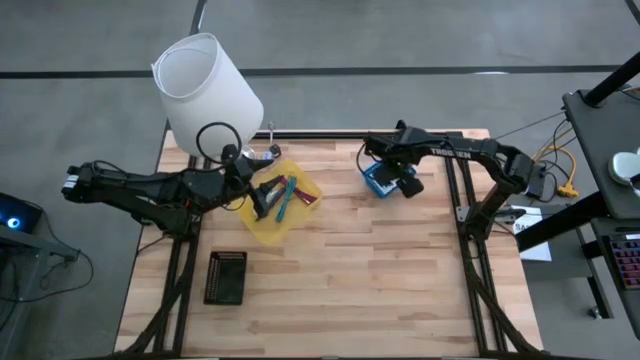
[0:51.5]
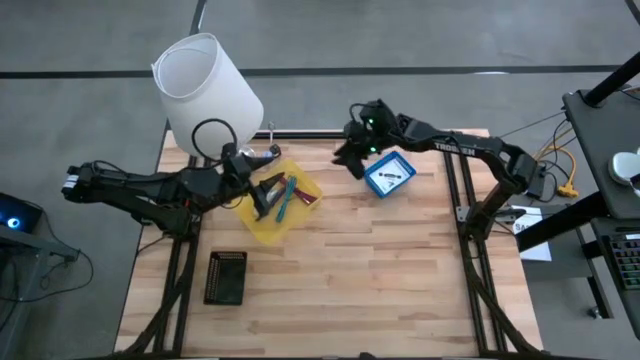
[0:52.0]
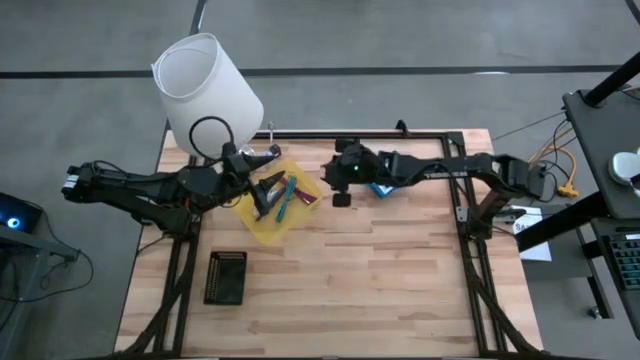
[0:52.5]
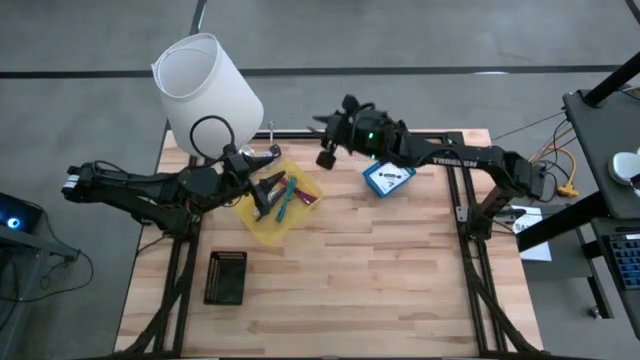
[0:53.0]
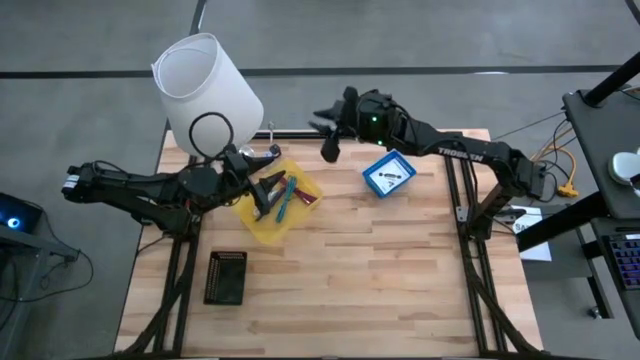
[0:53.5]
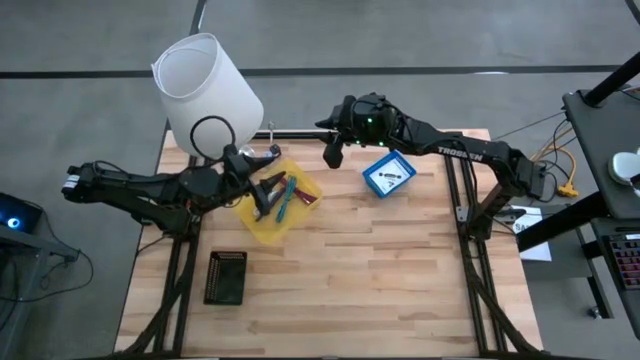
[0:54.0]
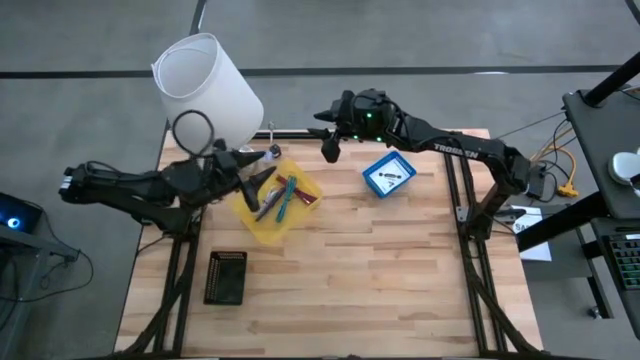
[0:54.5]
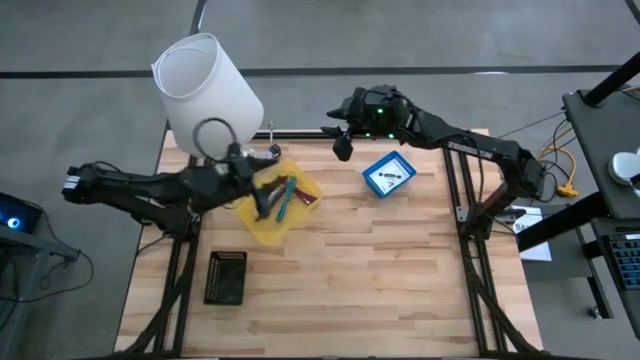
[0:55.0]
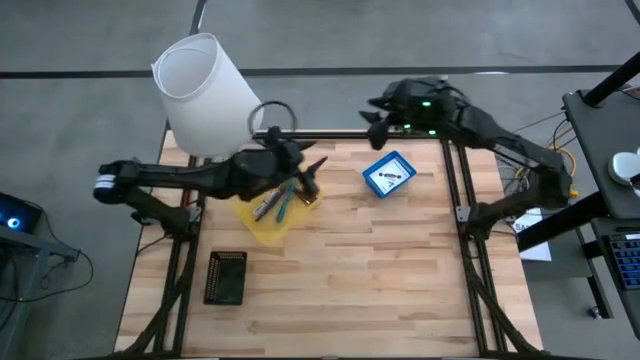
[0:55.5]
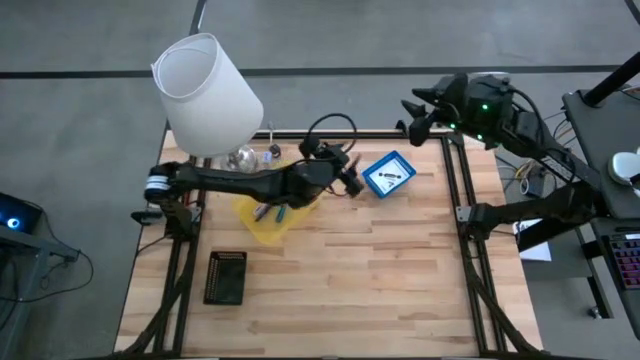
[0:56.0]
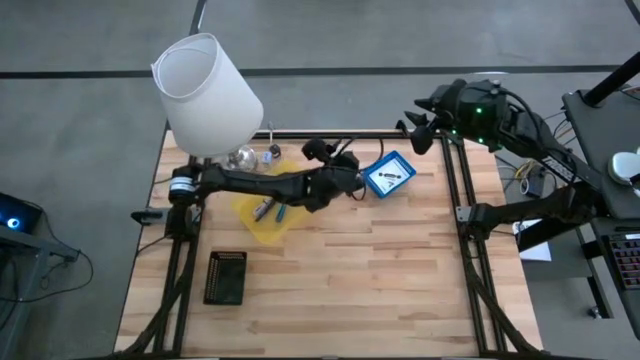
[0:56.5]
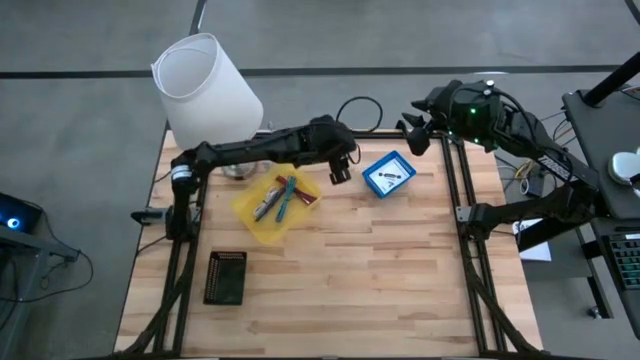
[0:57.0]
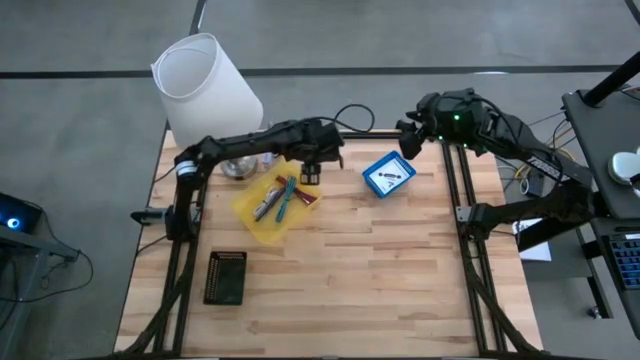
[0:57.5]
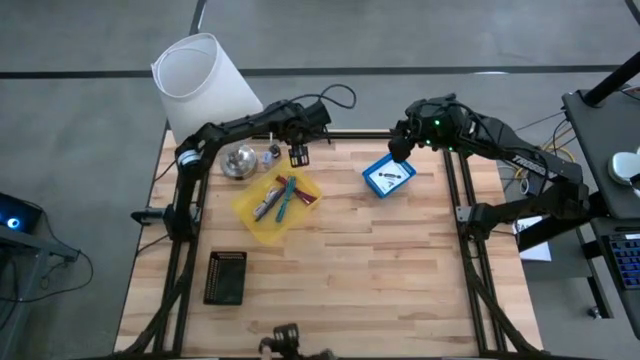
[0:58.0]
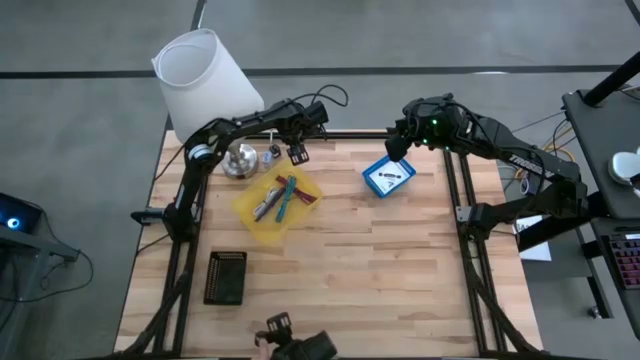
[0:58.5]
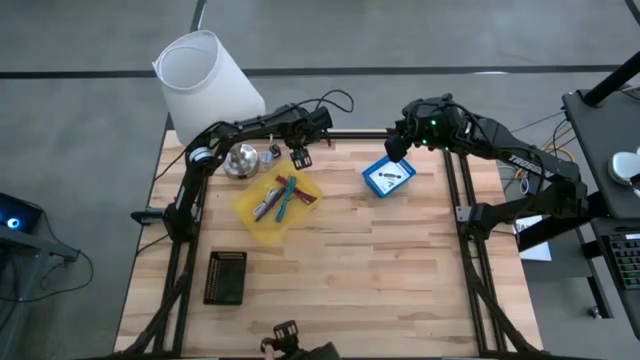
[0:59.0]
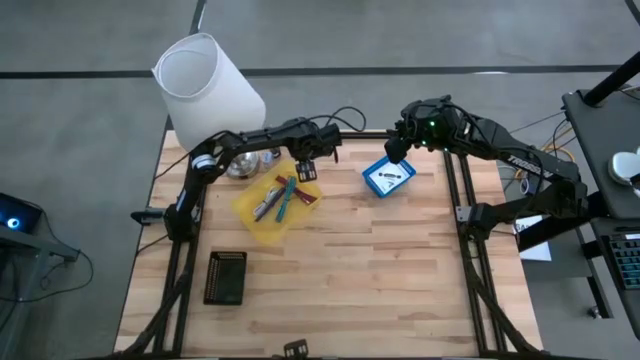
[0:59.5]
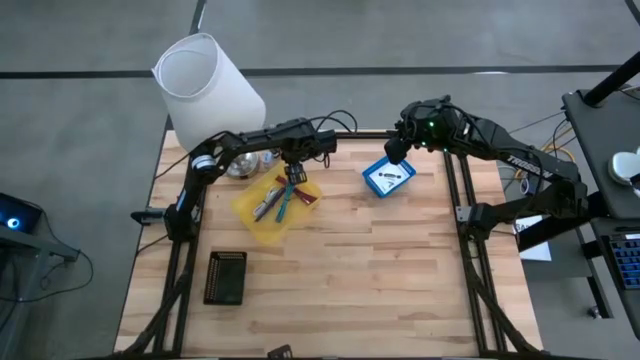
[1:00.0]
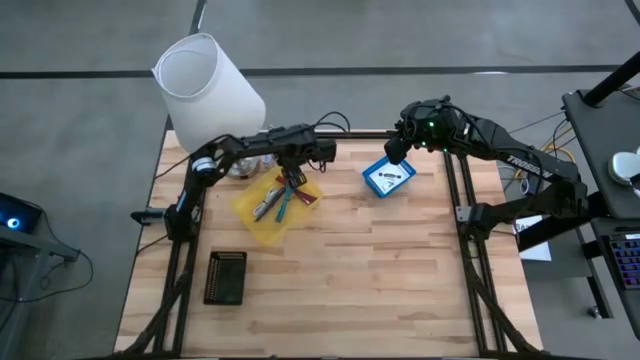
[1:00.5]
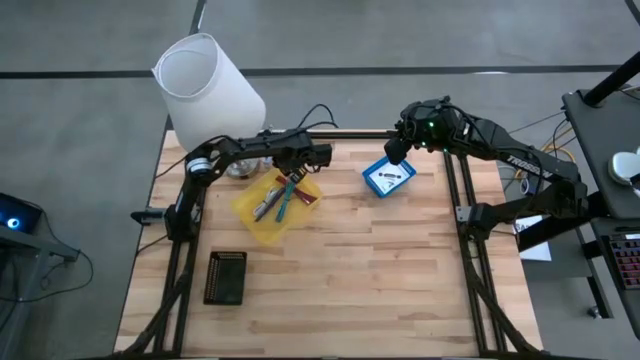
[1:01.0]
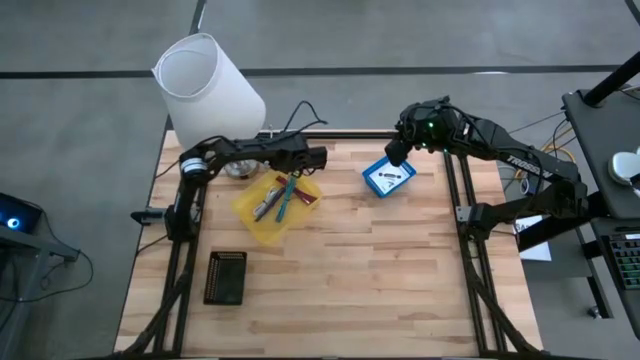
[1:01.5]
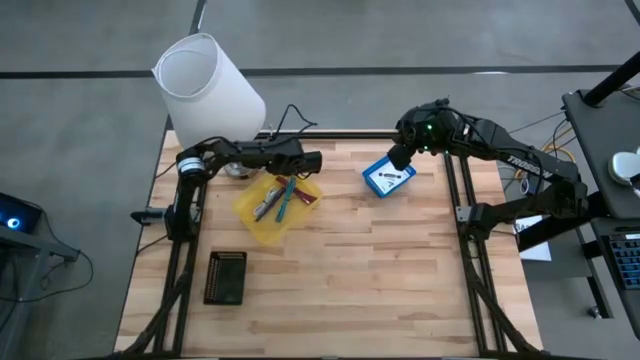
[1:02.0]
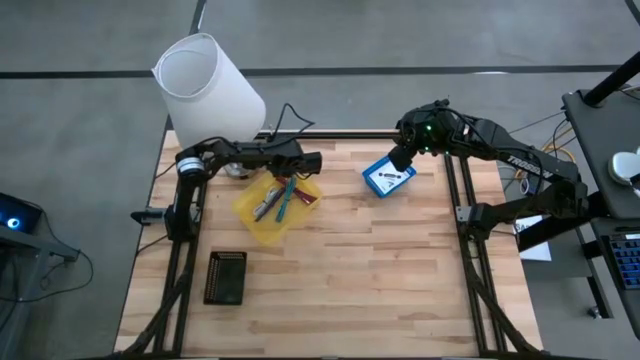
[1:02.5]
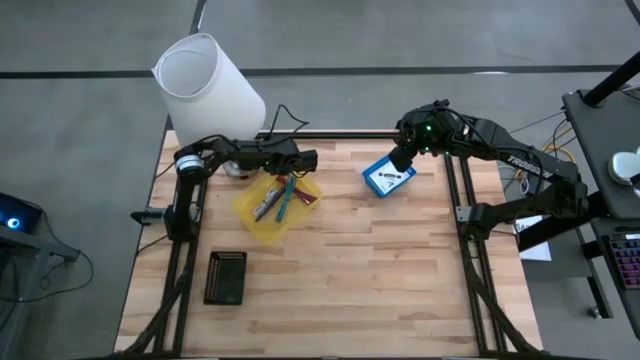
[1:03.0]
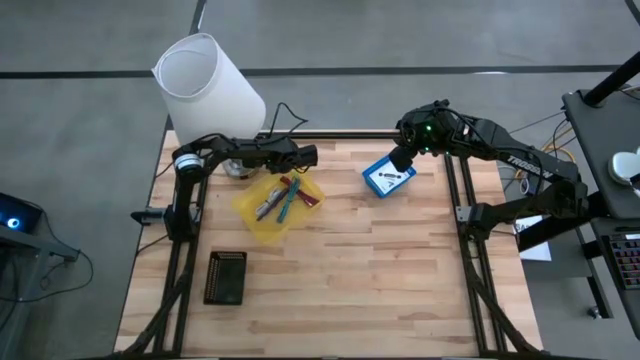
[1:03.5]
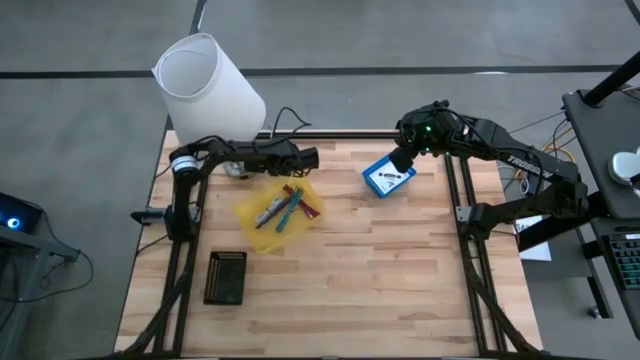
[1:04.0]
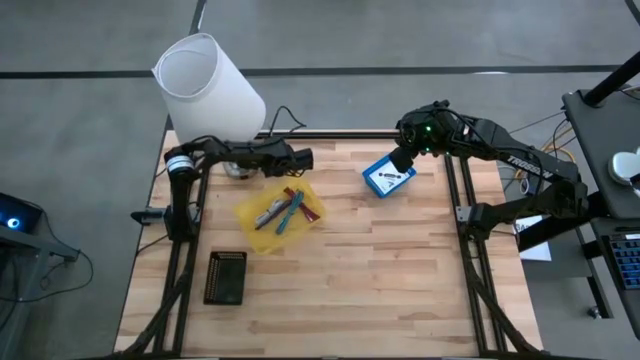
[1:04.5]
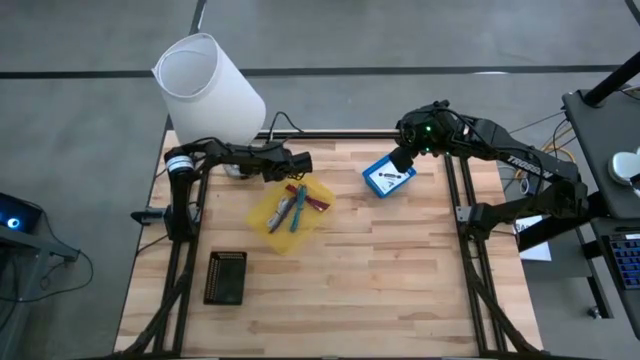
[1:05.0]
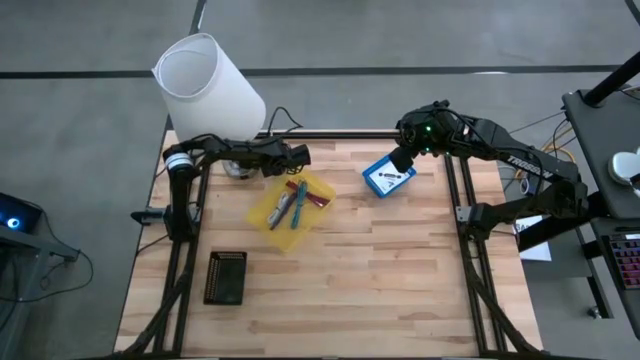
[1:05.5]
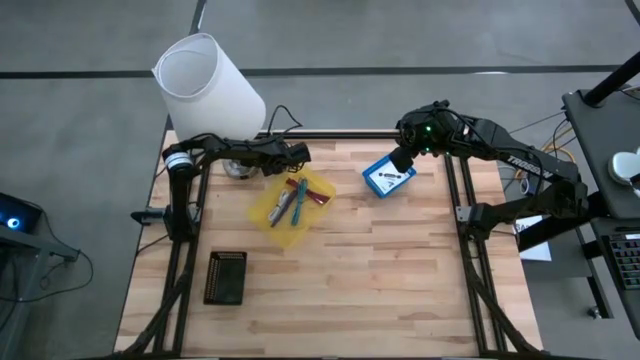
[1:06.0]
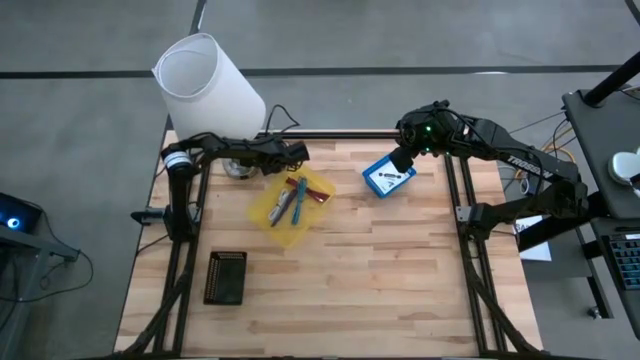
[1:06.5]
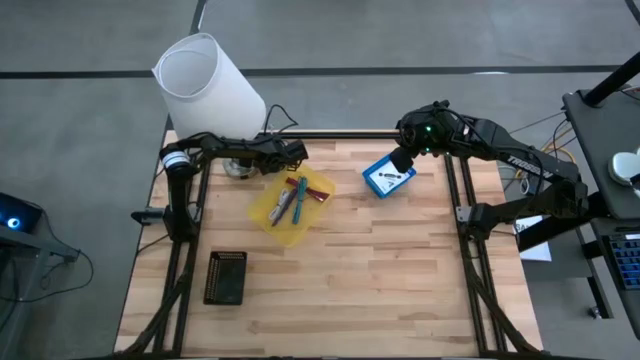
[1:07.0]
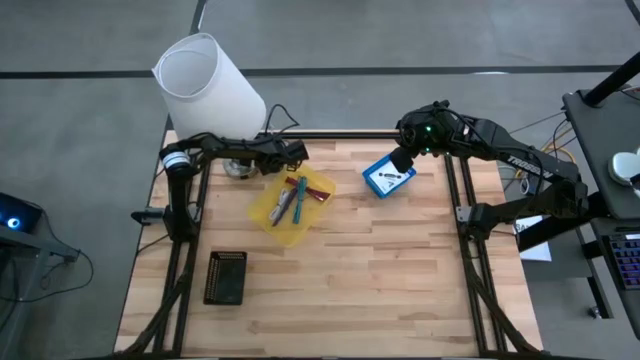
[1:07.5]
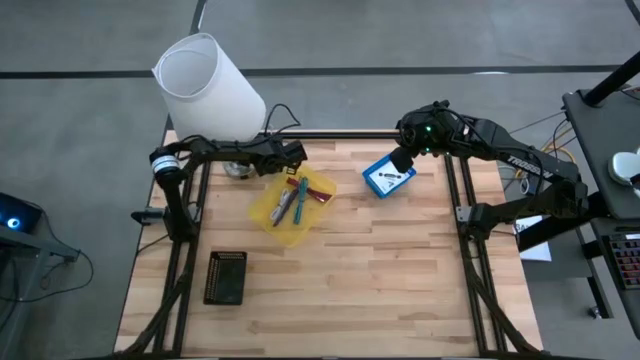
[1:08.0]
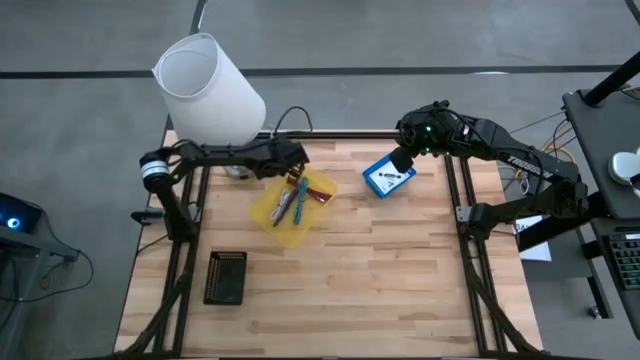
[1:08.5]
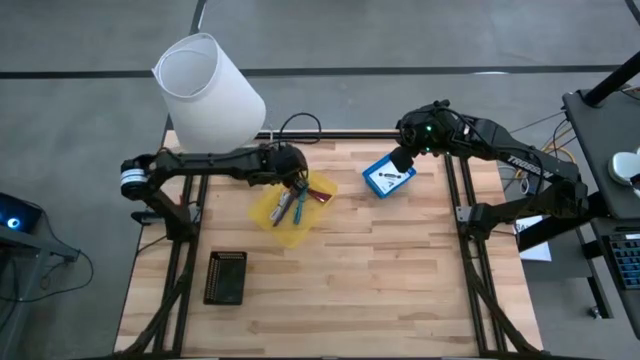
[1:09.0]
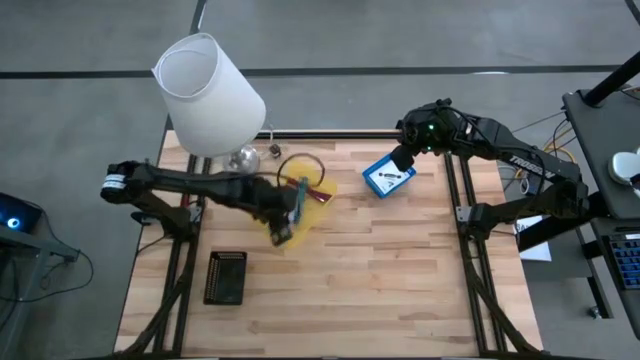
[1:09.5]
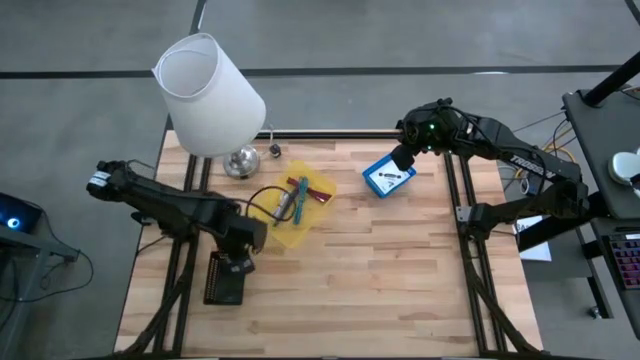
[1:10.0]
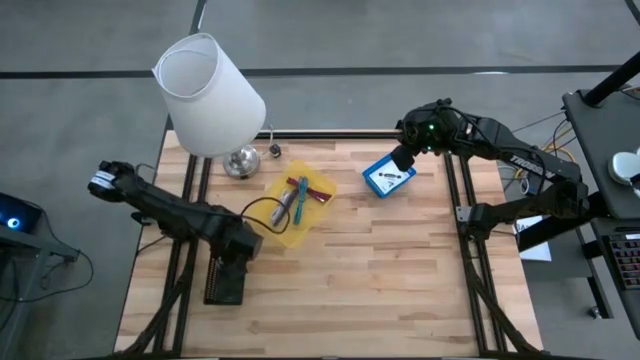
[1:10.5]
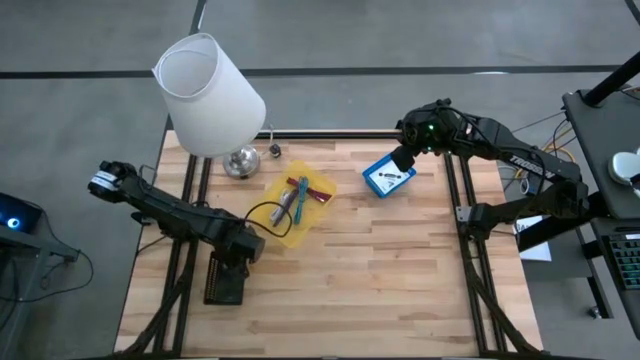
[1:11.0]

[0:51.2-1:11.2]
Task: Pick and place items into bin
Put the white charger adapter into the black bin

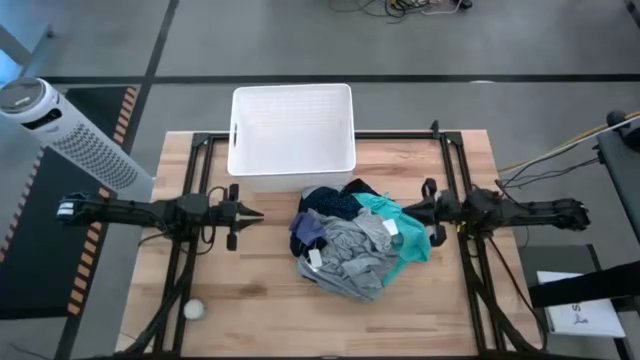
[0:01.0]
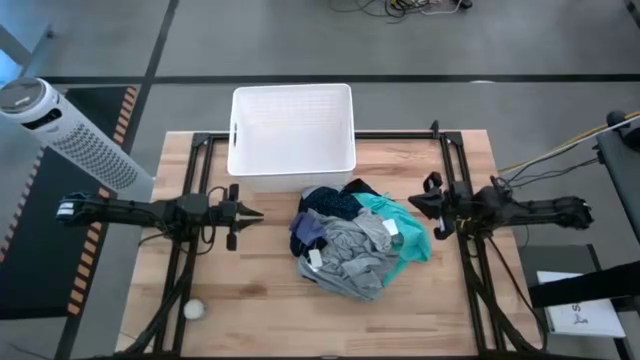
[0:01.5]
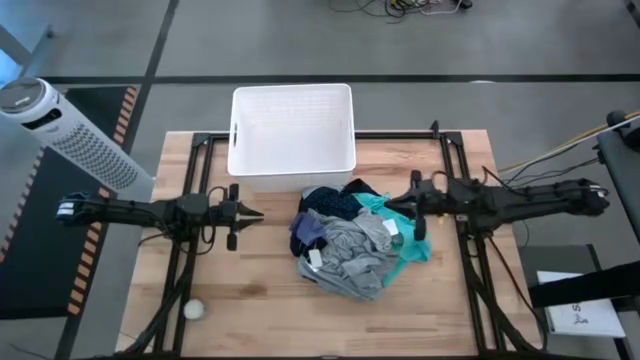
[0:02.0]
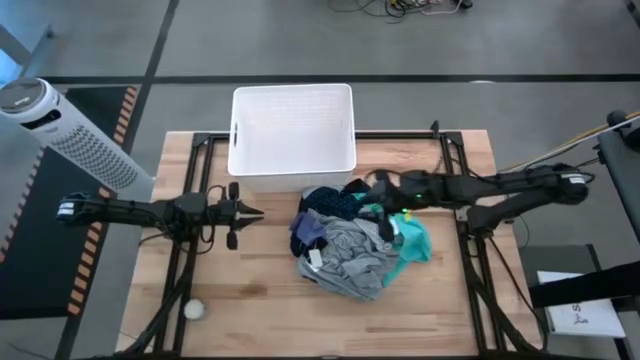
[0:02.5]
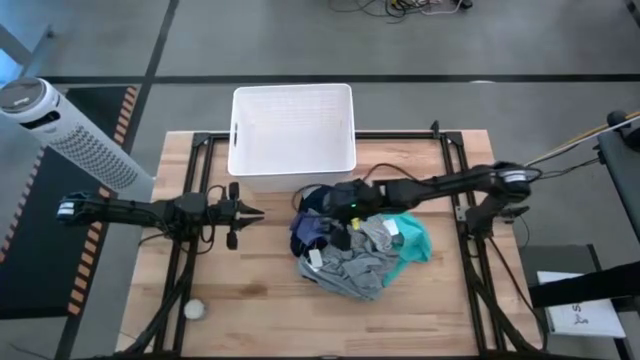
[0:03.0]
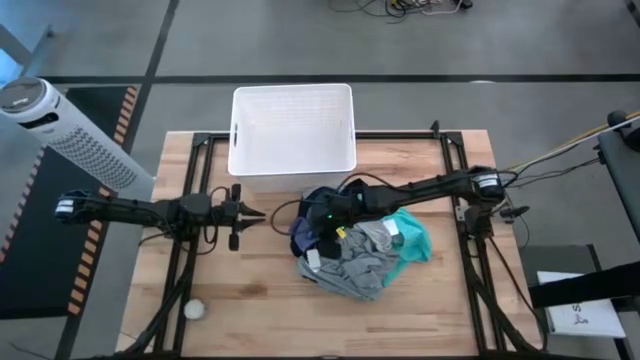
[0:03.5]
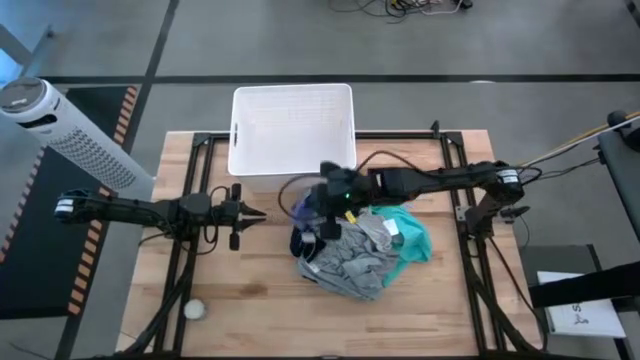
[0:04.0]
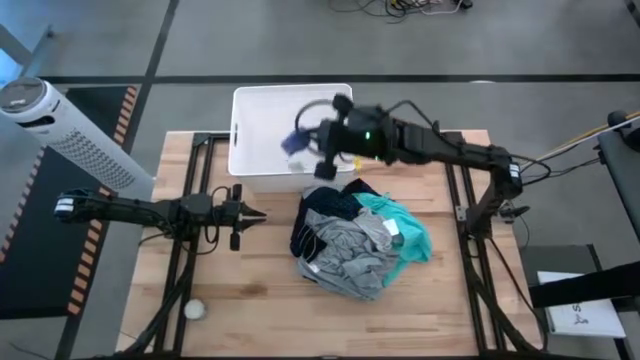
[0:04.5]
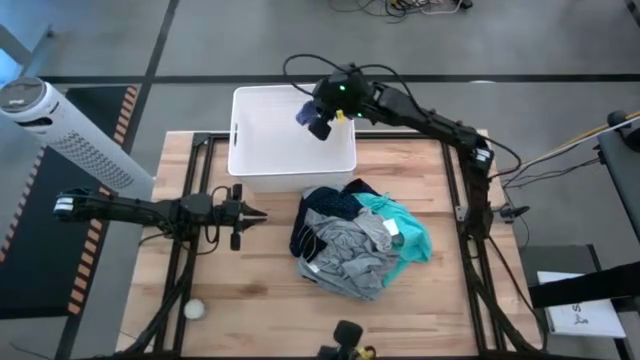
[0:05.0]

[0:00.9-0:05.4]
Task: Sort clothes
Put the purple sock into the white laundry bin
